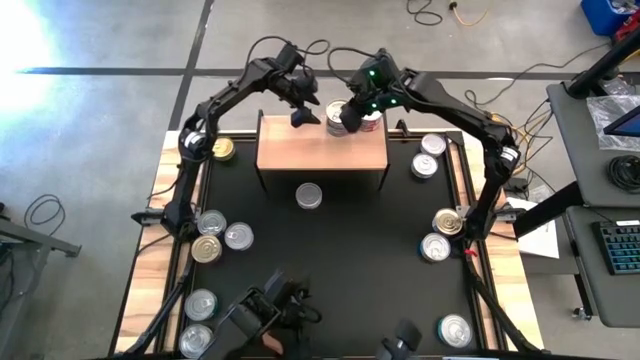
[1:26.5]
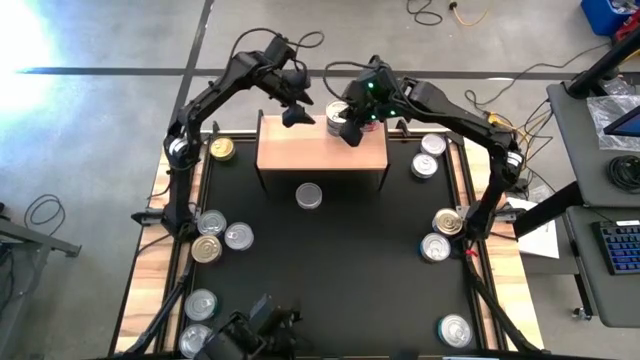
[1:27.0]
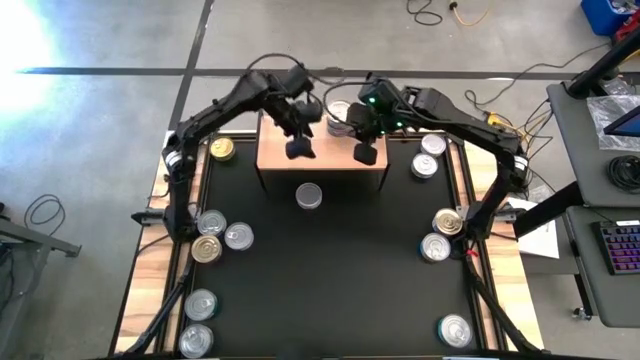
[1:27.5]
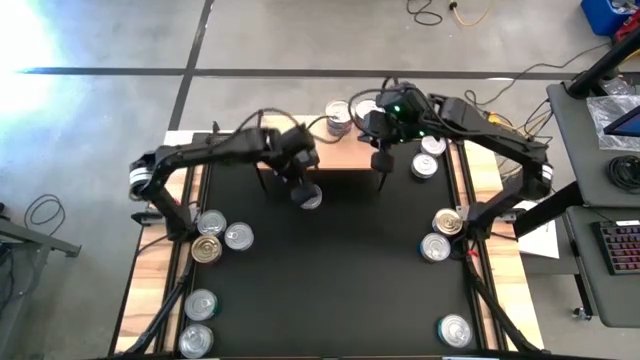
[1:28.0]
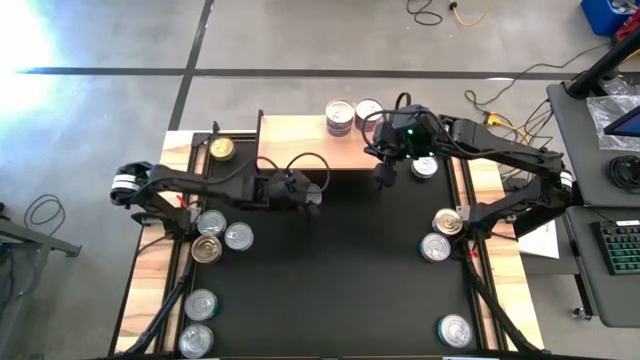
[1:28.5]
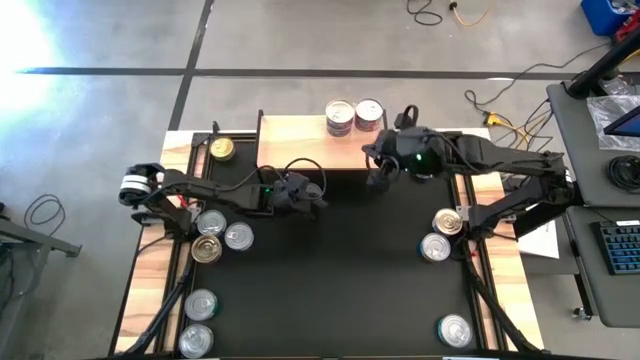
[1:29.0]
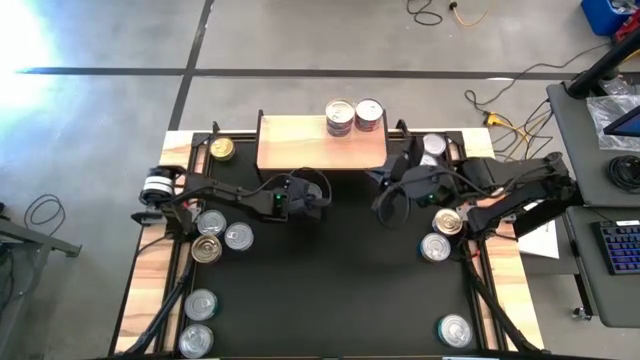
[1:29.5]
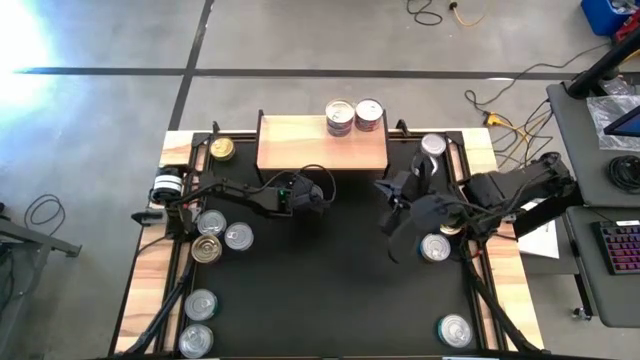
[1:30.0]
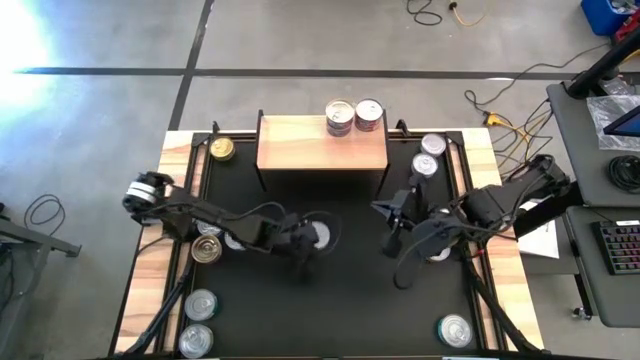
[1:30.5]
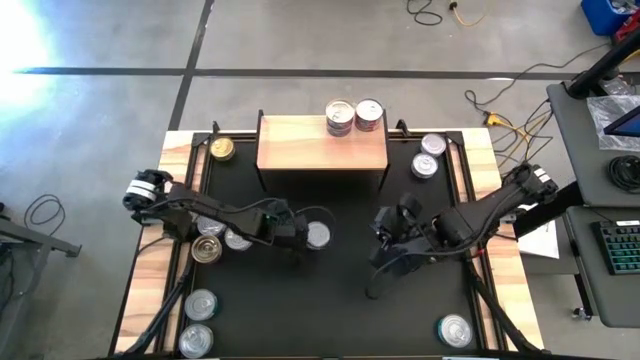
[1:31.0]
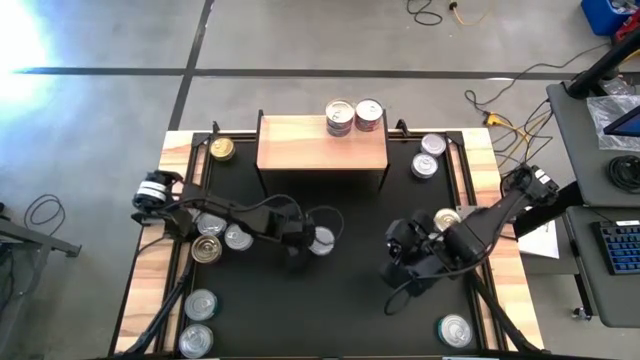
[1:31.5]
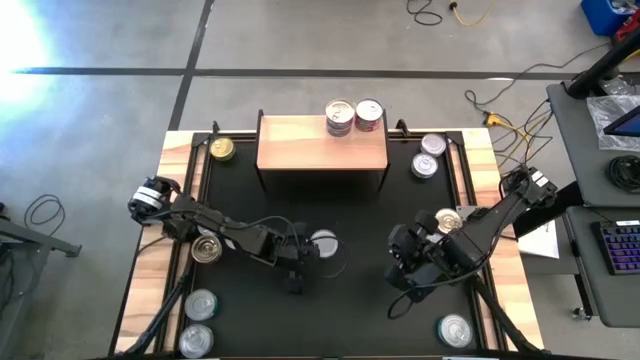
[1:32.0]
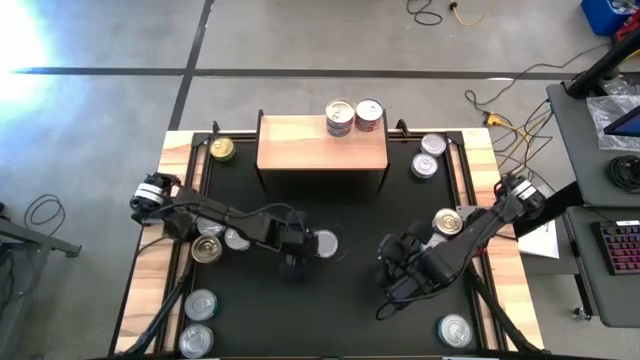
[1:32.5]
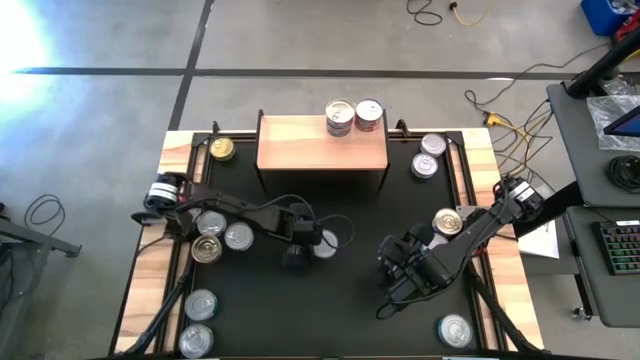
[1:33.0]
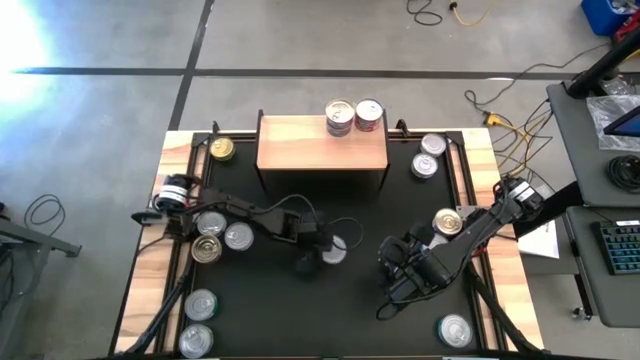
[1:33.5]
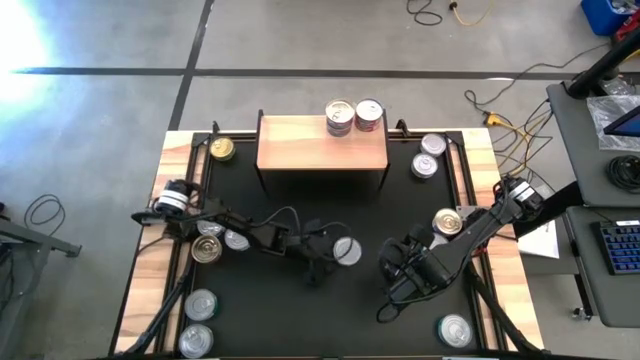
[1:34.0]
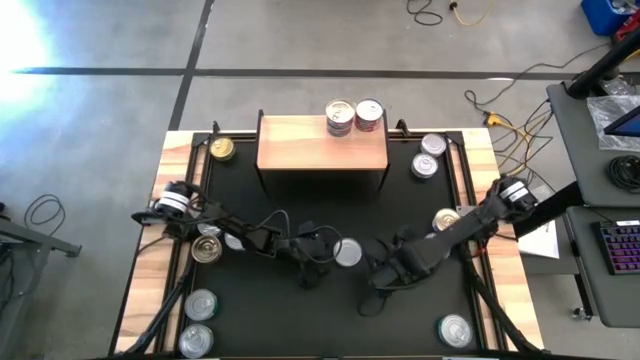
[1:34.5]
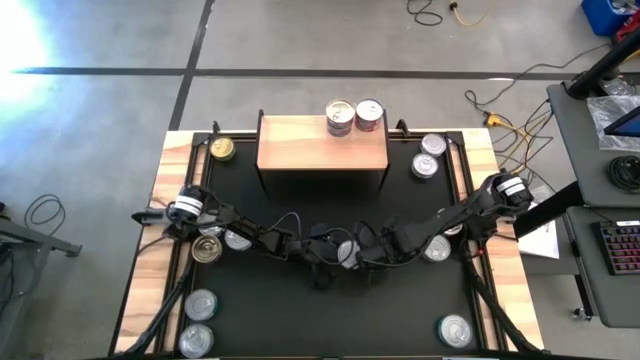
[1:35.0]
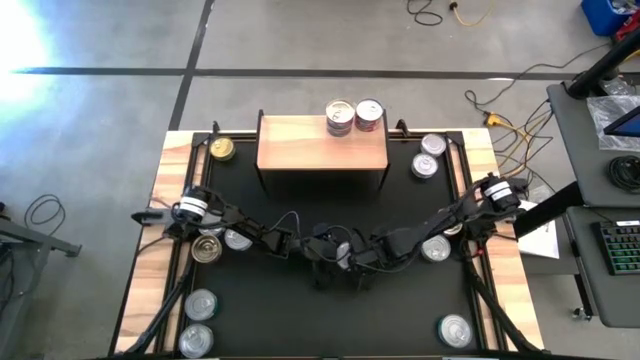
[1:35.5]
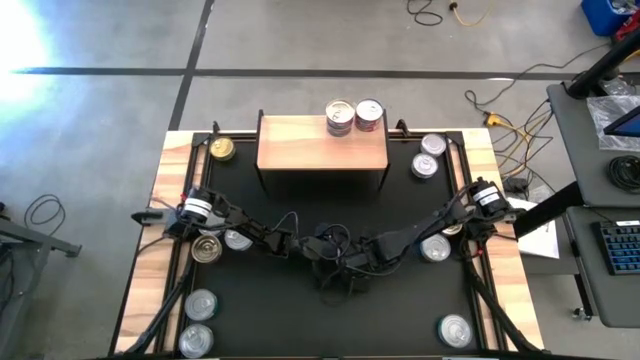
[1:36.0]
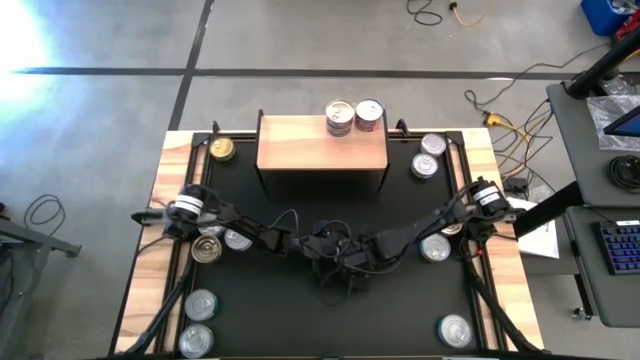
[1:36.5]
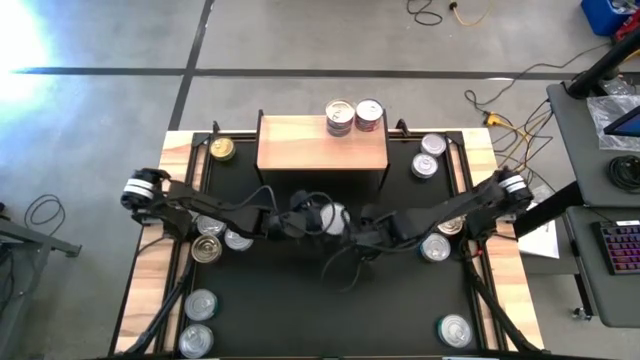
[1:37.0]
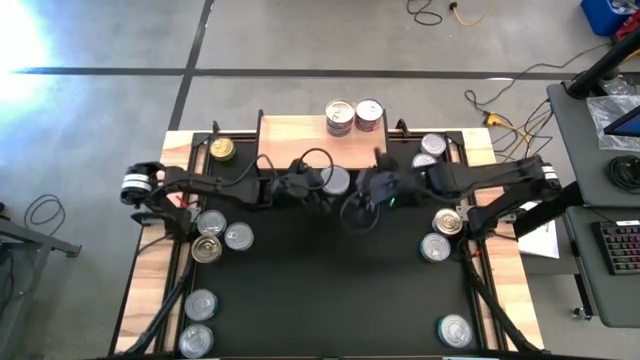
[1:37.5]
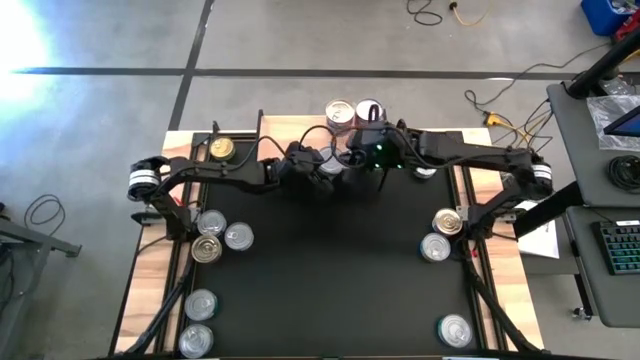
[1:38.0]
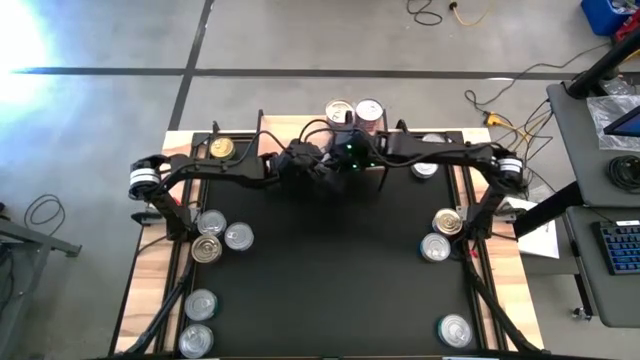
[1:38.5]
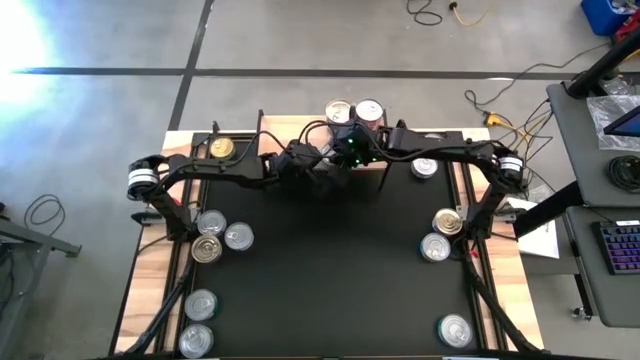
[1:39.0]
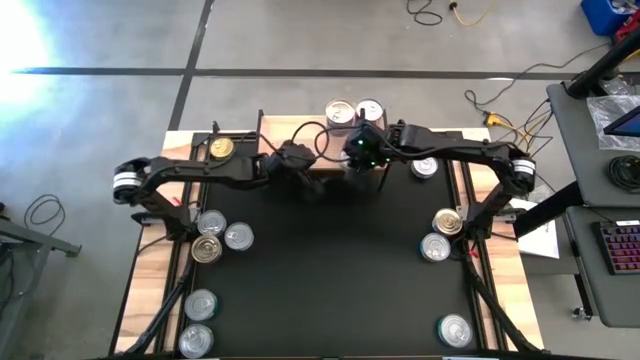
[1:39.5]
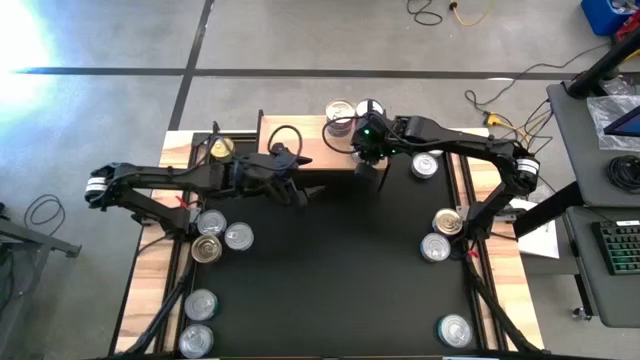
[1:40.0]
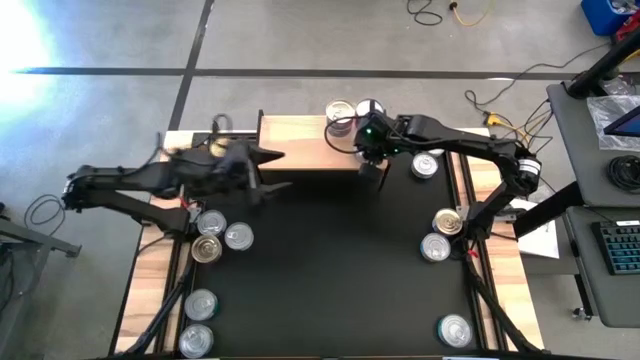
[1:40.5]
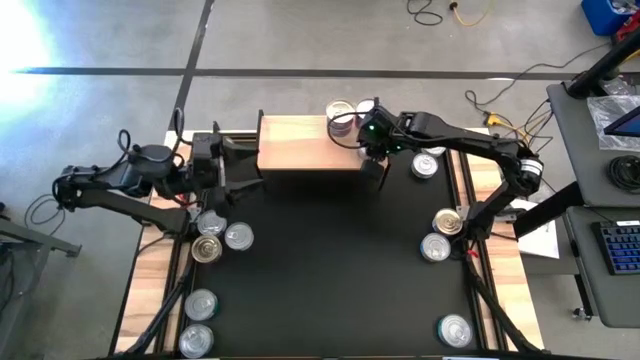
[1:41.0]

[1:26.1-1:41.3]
Task: Stack canned seafood by type on shelf
Put the white-green tuna can on the shelf

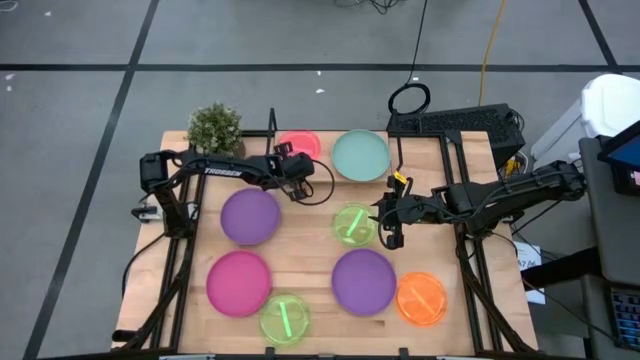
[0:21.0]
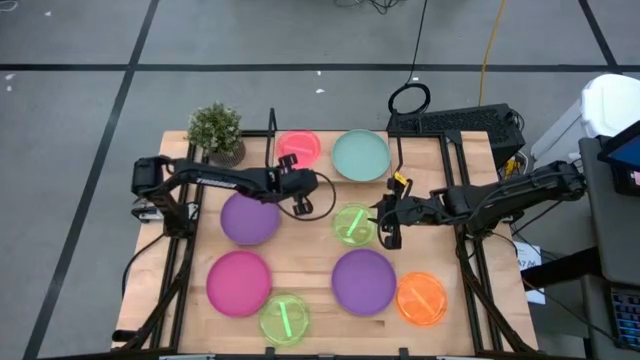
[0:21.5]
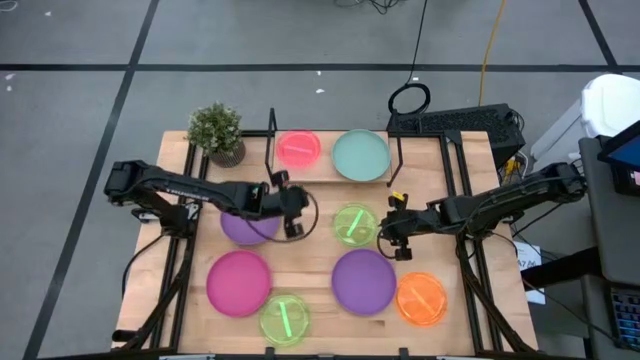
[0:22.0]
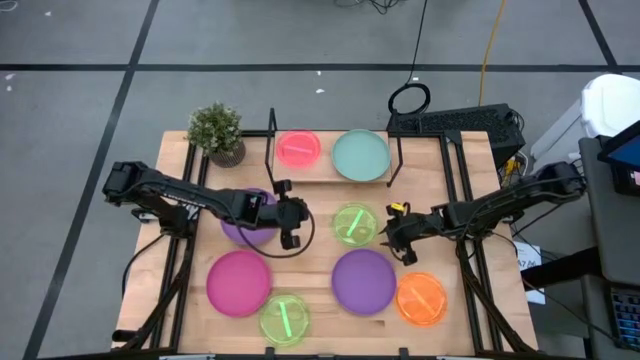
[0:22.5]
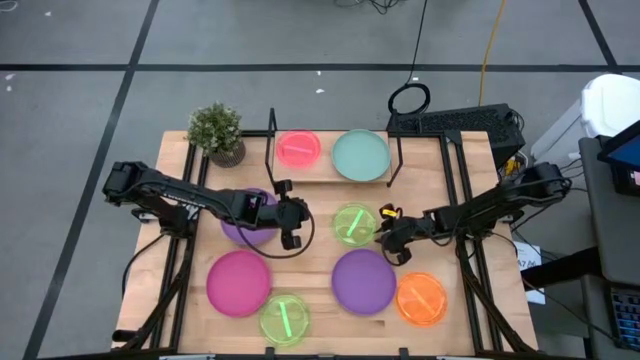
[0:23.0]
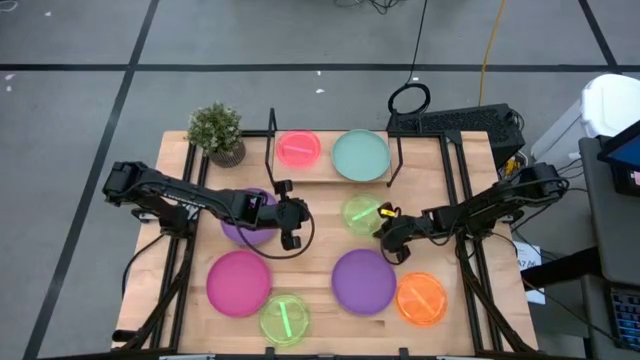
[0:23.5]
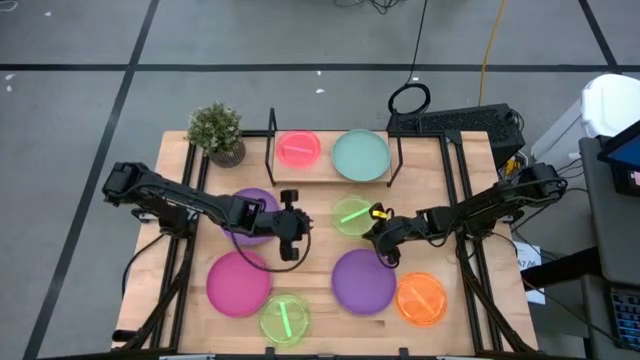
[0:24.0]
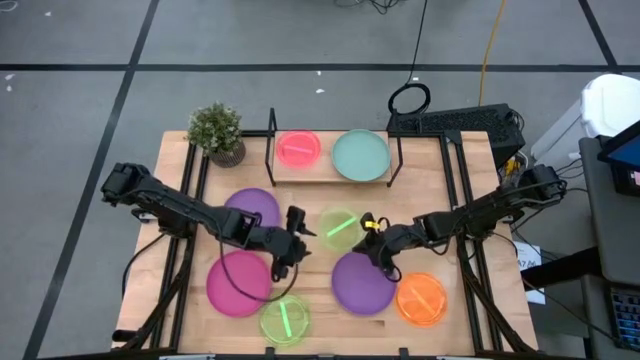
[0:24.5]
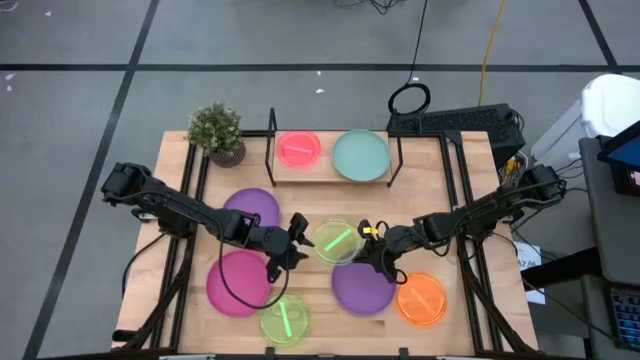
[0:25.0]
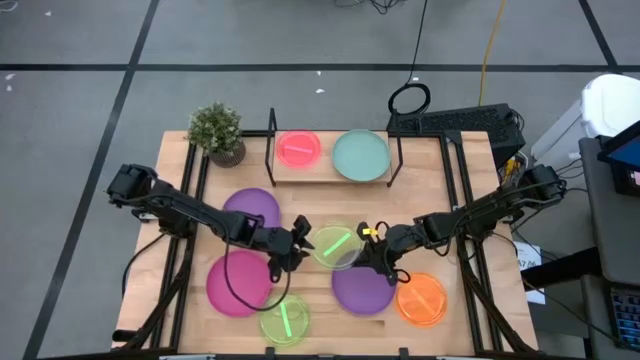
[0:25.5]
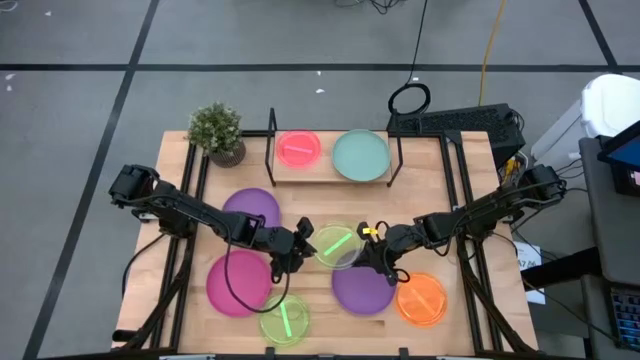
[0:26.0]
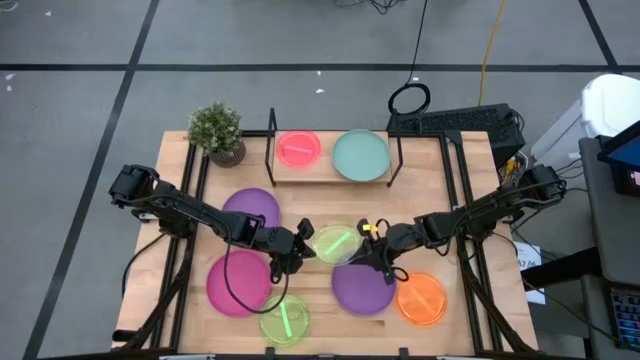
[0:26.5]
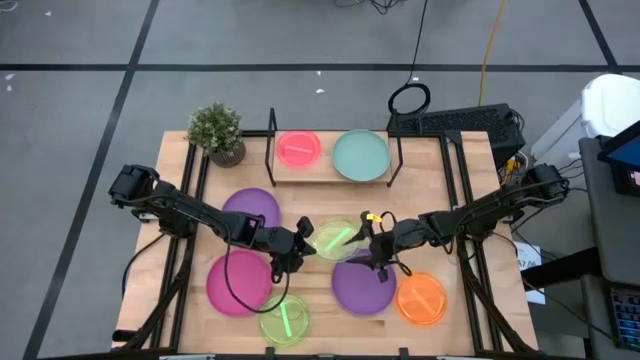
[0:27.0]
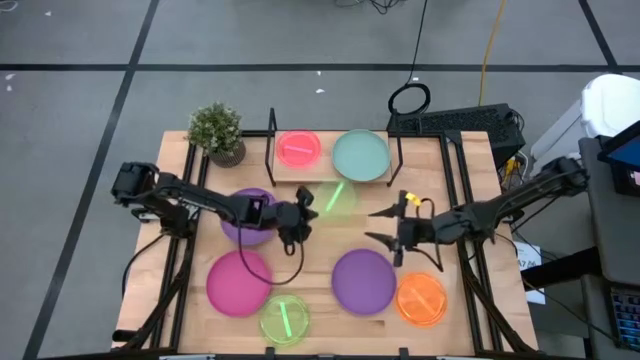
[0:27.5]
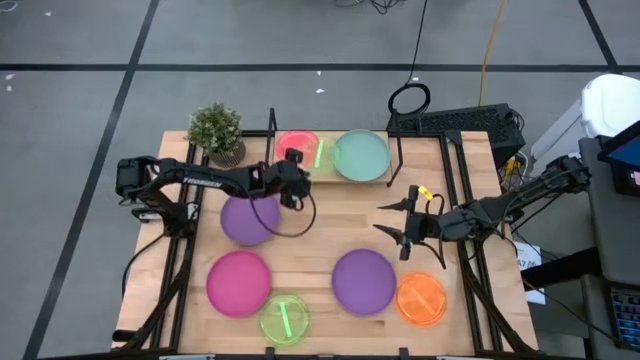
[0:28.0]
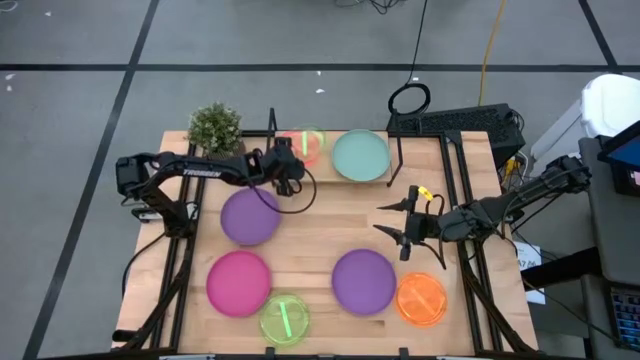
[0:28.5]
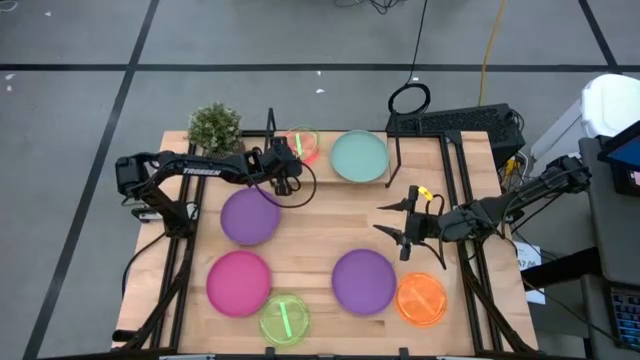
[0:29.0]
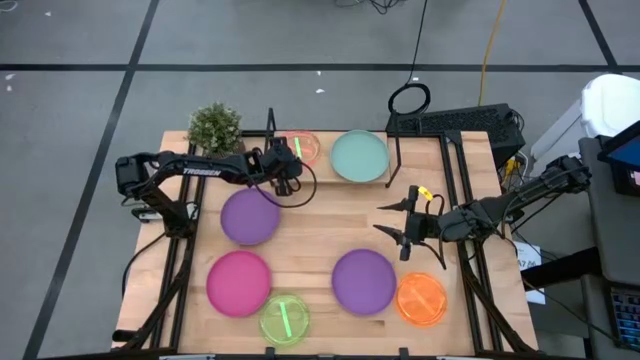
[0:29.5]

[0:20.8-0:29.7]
Task: Place and stack plates onto a shelf
Stack the top transparent green plate on top of the transparent pink plate
